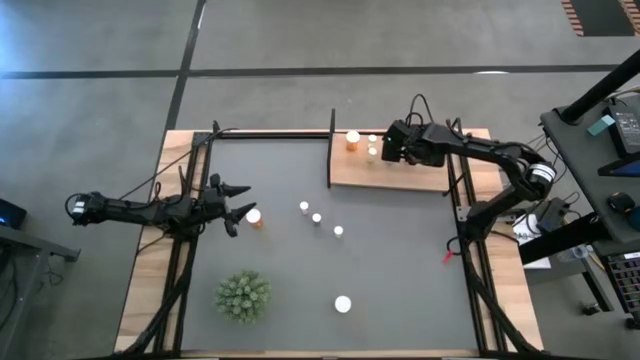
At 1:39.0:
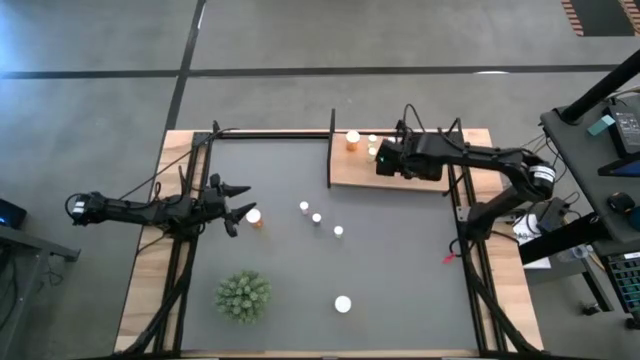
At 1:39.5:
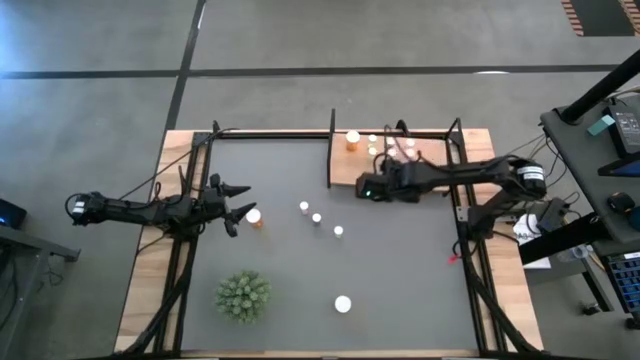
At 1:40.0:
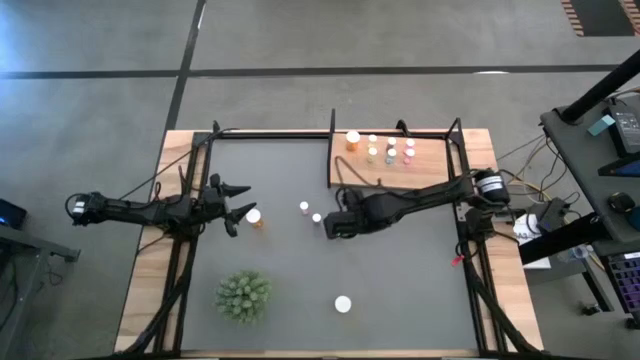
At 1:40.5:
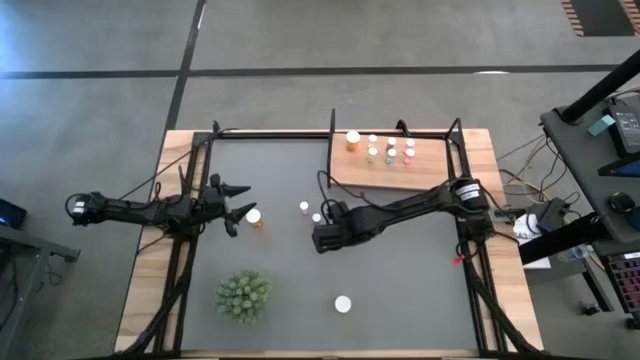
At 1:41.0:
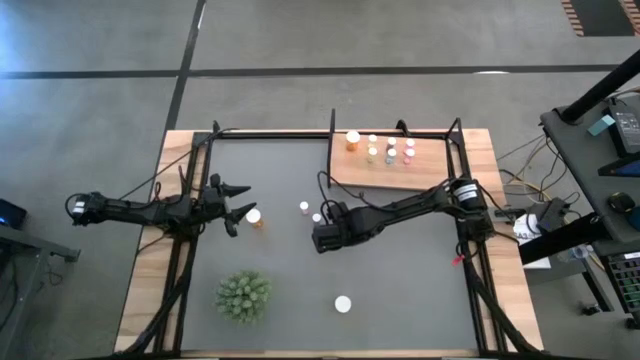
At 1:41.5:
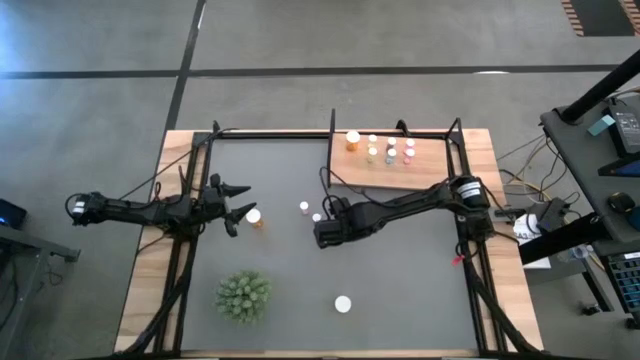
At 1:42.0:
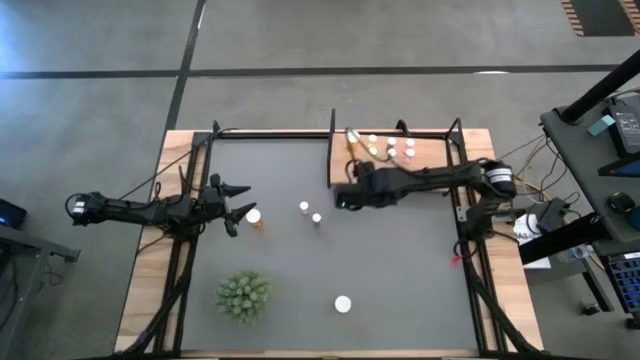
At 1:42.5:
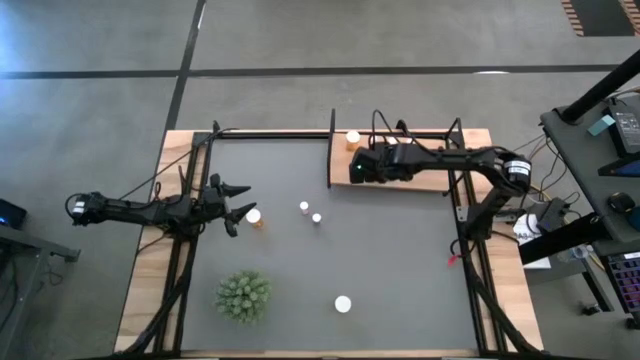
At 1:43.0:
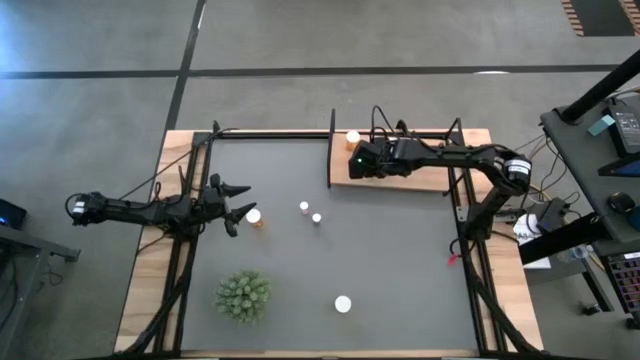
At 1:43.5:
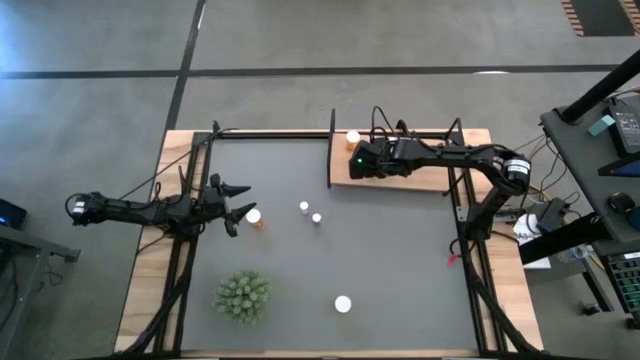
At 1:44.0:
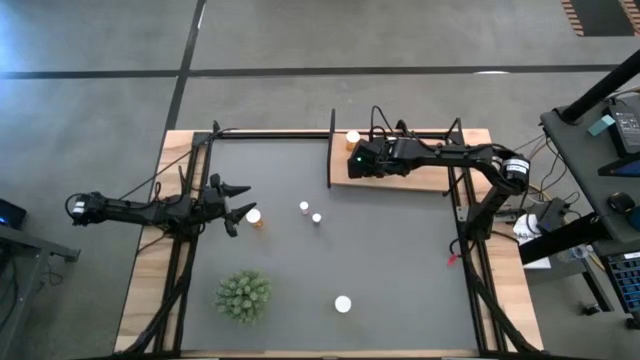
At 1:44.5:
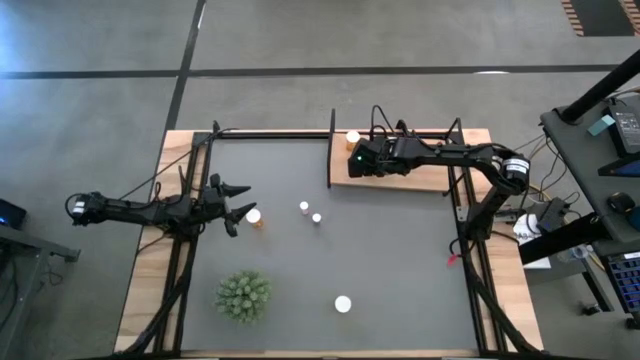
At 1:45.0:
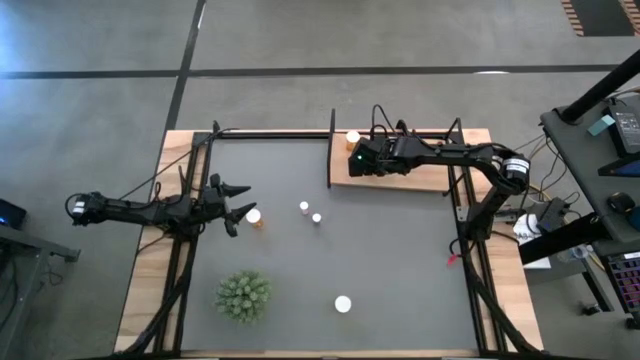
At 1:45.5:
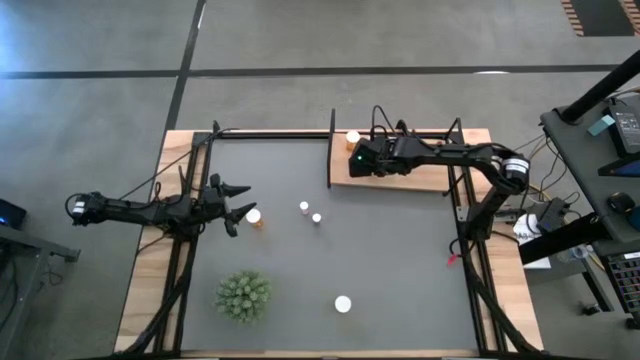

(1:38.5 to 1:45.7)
Task: Pick and place medicine bottles onto shelf by color
Put the yellow pill bottle on the shelf aligned with the other yellow pill bottles

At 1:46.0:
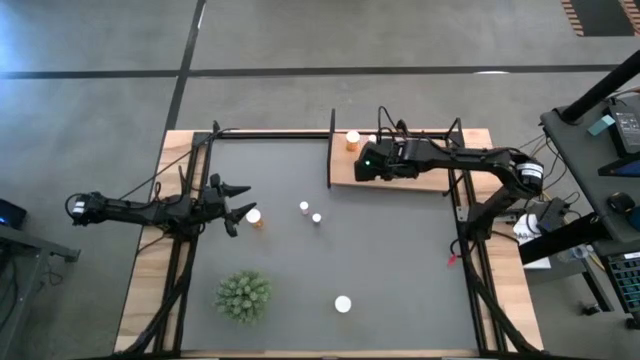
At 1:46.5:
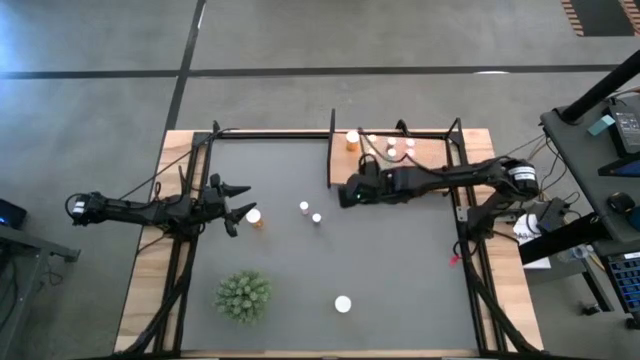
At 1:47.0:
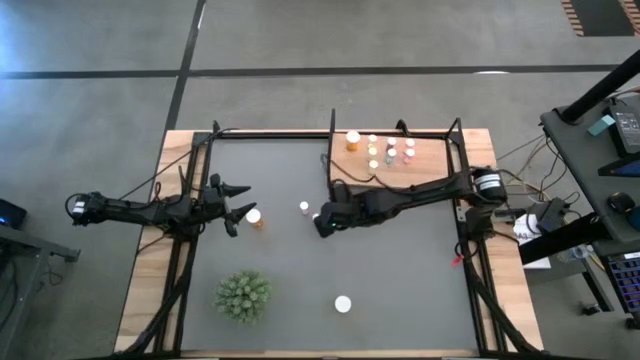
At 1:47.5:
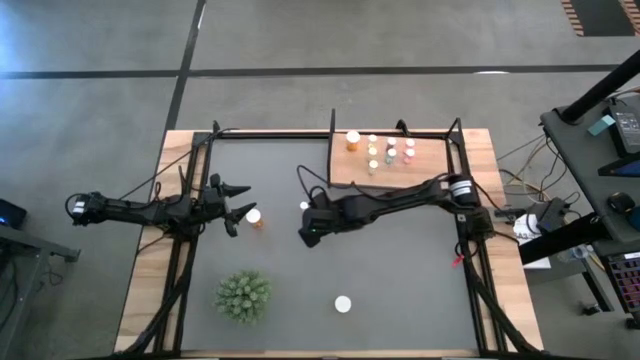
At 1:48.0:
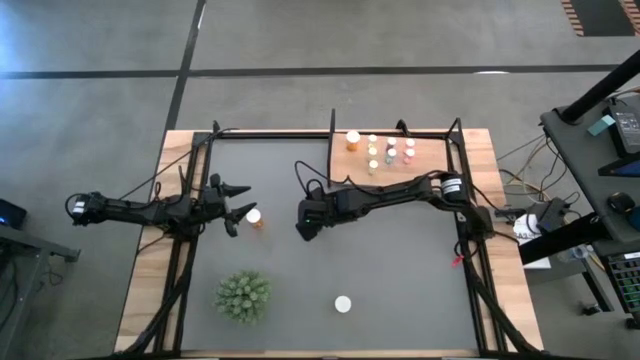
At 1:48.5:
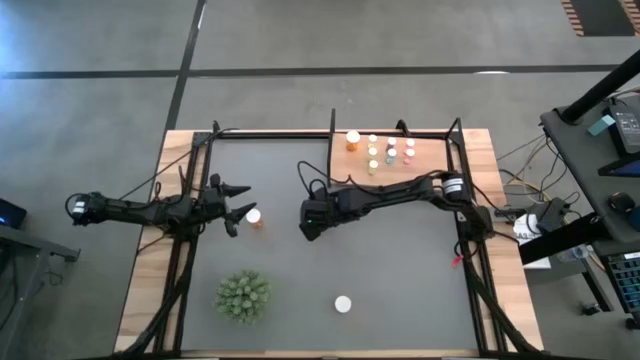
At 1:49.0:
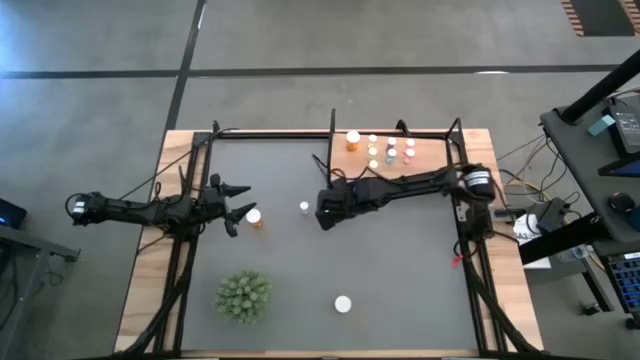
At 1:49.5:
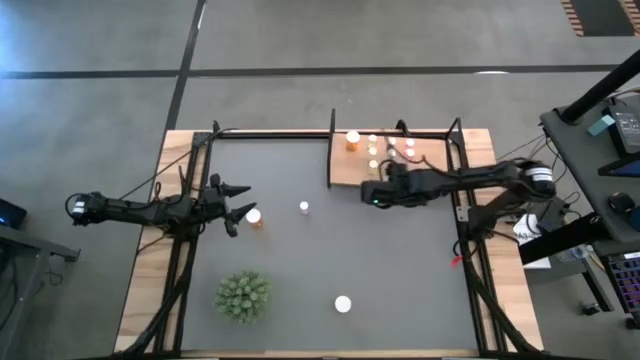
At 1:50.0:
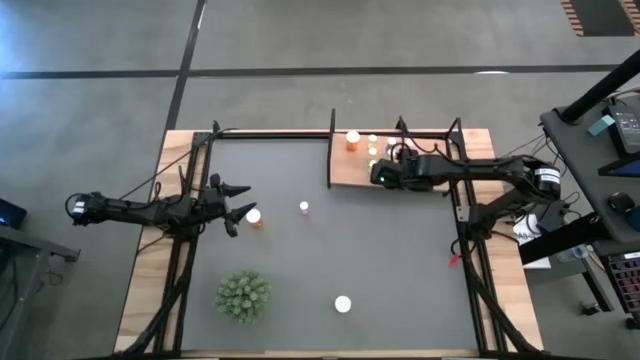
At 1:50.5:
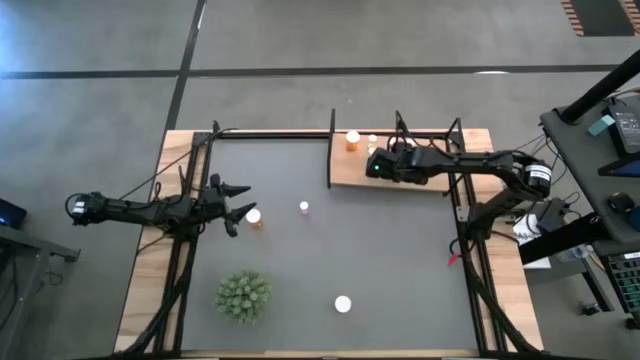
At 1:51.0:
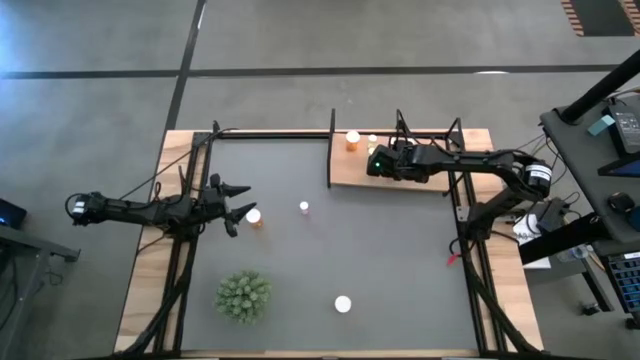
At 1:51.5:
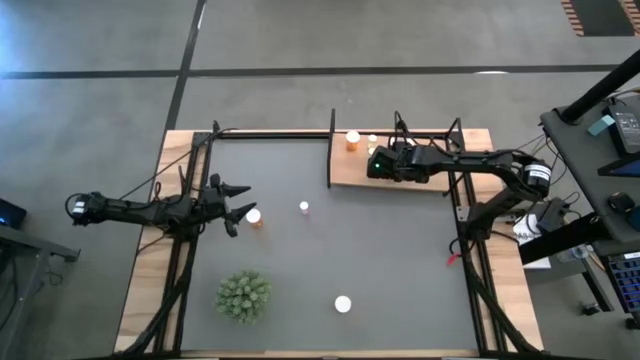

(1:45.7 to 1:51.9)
Put the blue pill bottle on the shelf aligned with the other blue pill bottles

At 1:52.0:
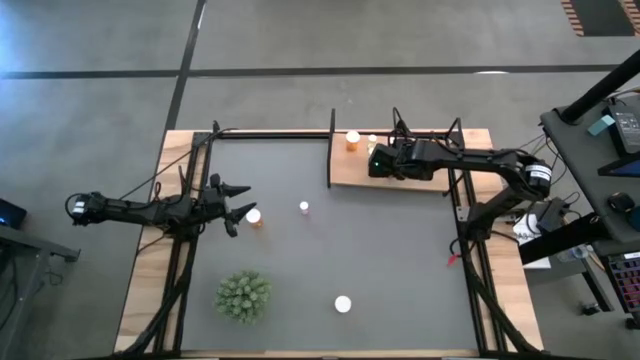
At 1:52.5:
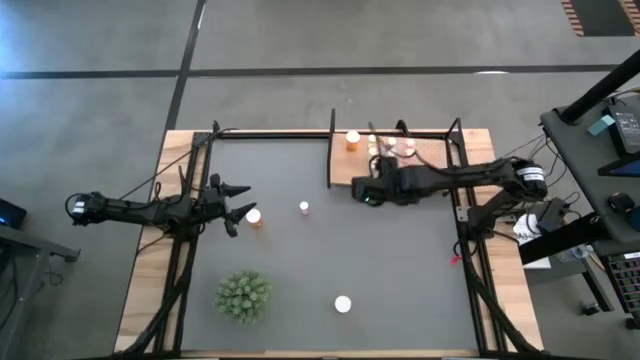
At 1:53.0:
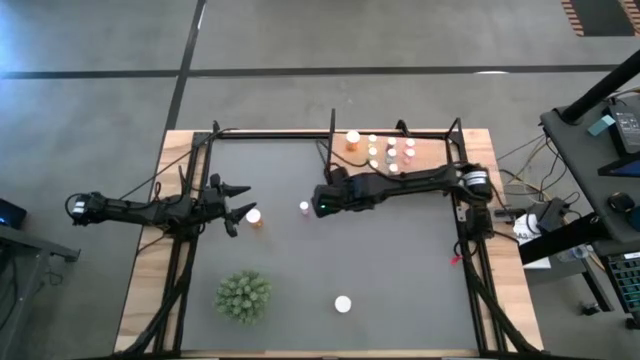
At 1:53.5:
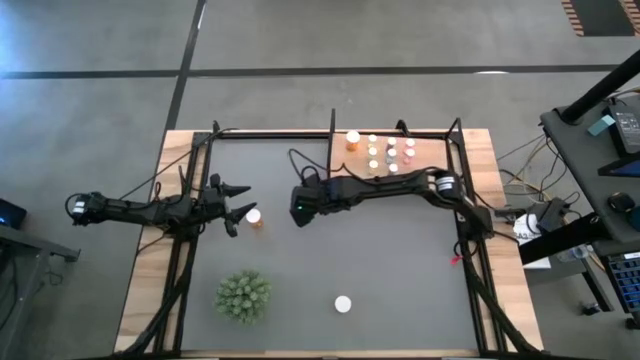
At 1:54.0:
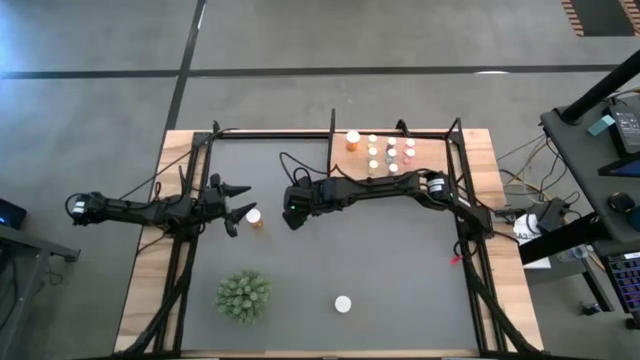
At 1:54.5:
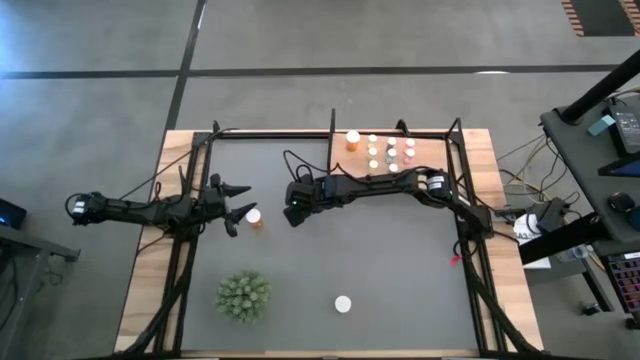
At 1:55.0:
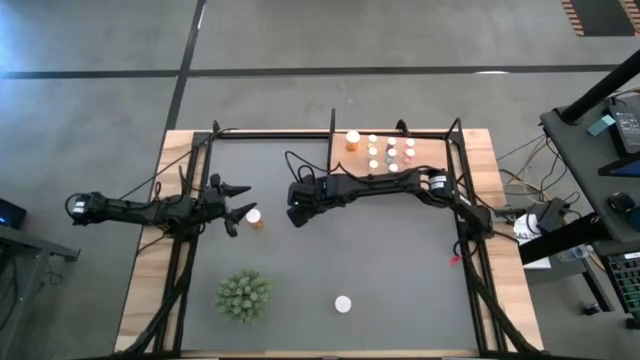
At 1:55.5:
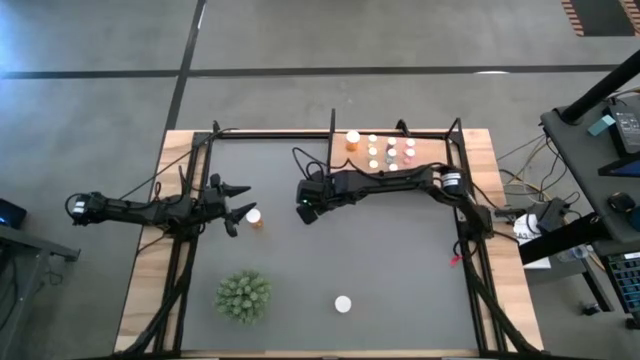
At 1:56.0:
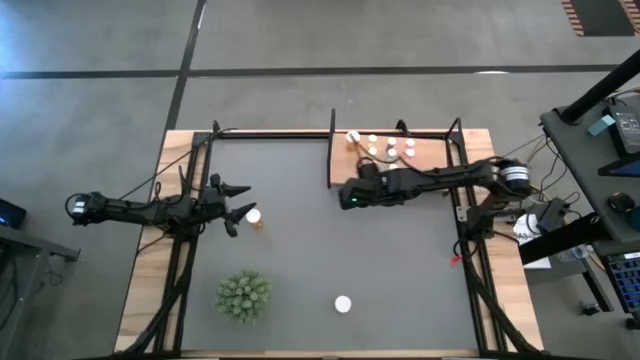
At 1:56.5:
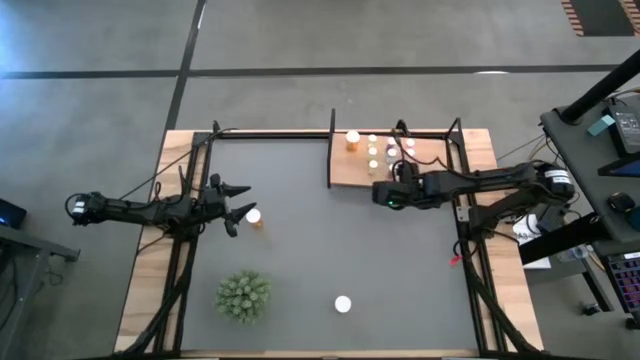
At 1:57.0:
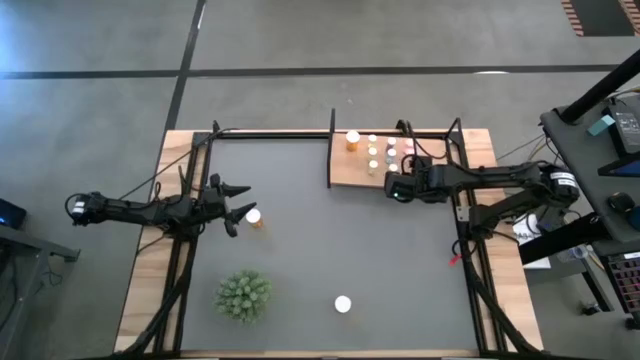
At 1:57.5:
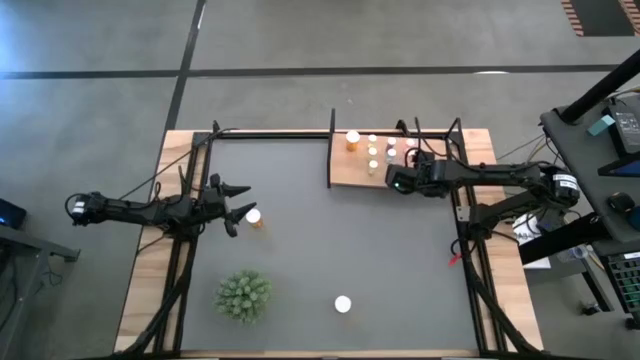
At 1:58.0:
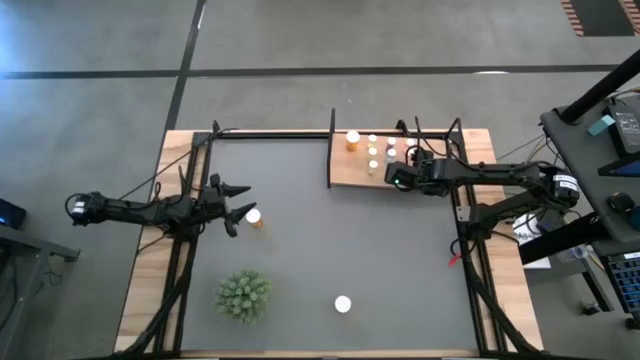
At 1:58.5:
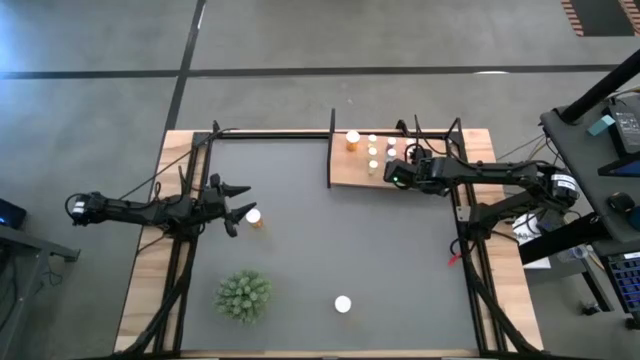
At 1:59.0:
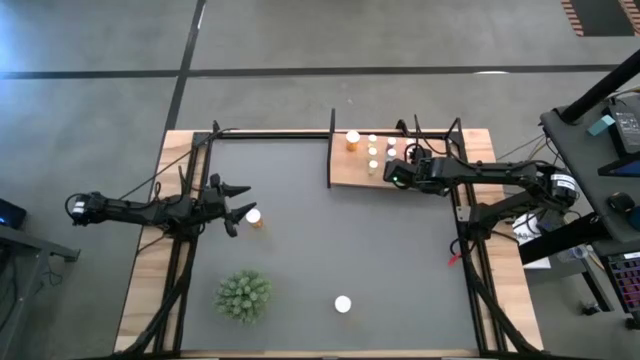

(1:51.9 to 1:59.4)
Put the pink pill bottle on the shelf aligned with the other pink pill bottles
